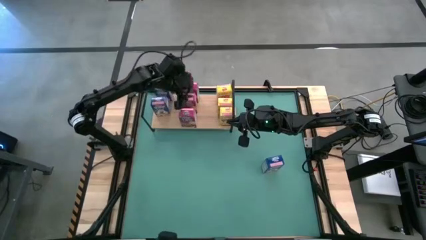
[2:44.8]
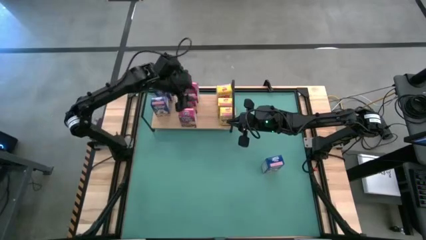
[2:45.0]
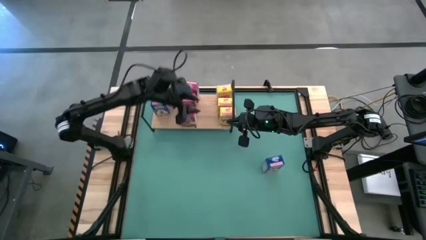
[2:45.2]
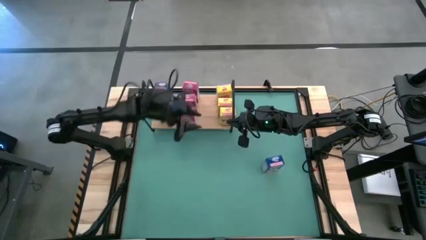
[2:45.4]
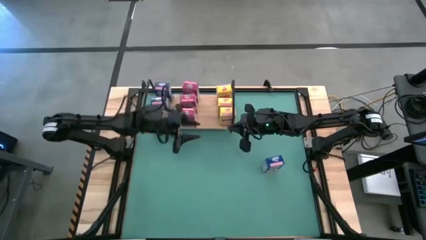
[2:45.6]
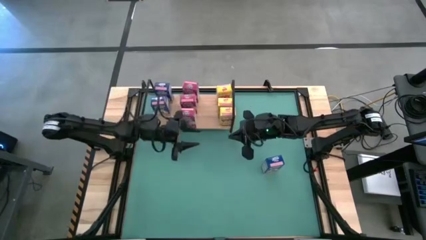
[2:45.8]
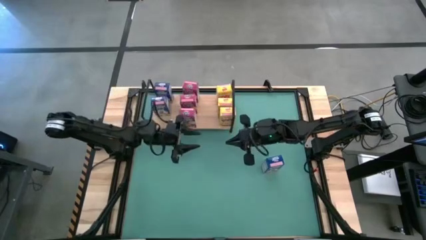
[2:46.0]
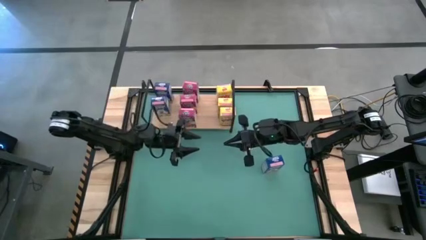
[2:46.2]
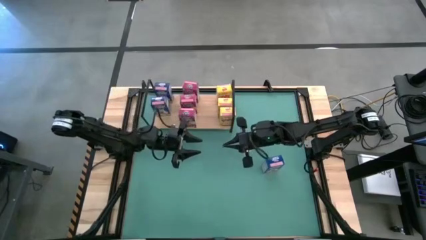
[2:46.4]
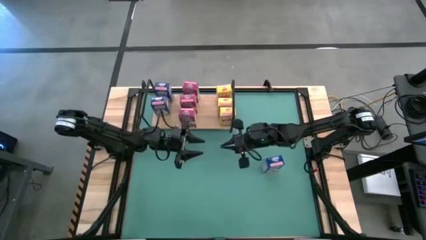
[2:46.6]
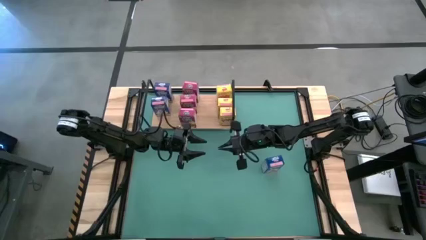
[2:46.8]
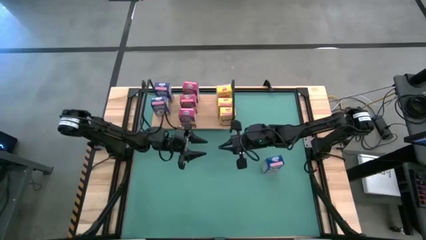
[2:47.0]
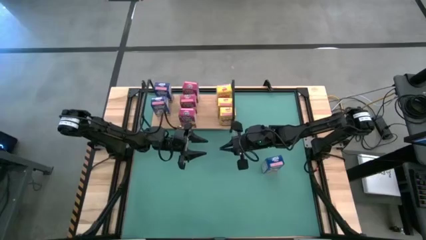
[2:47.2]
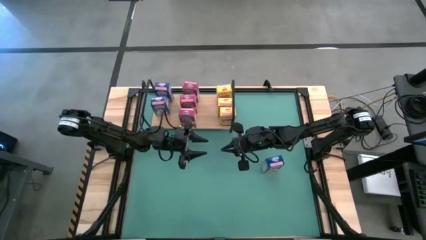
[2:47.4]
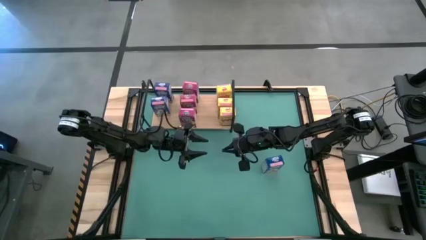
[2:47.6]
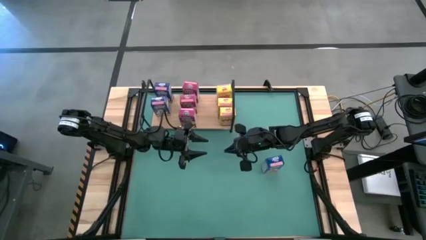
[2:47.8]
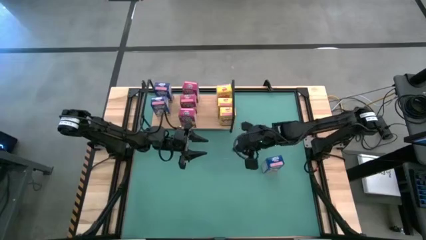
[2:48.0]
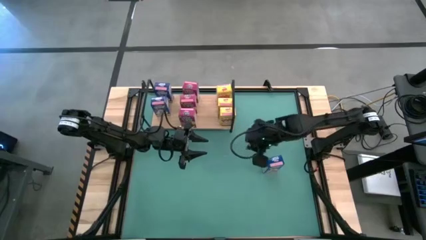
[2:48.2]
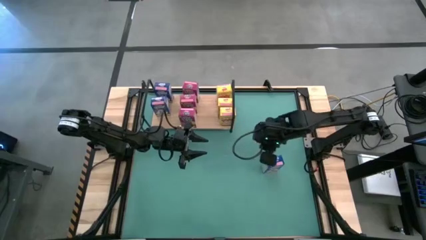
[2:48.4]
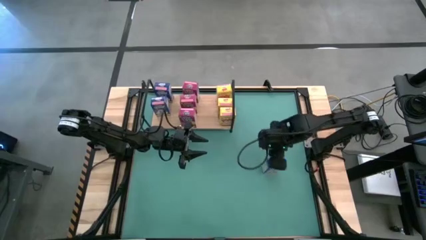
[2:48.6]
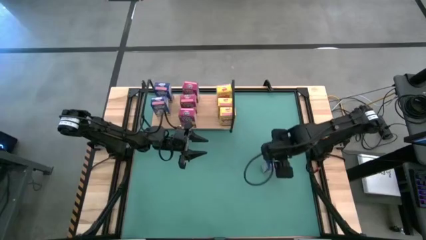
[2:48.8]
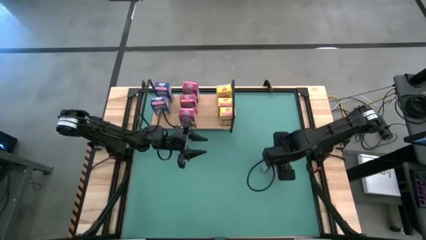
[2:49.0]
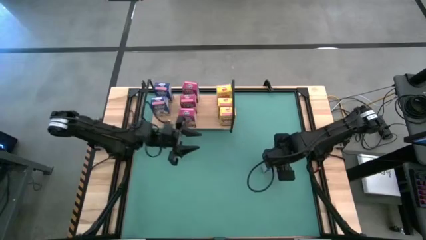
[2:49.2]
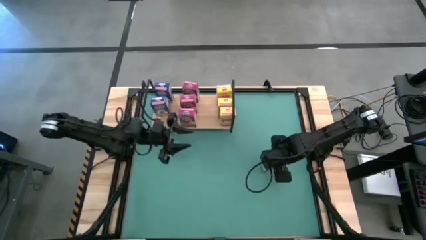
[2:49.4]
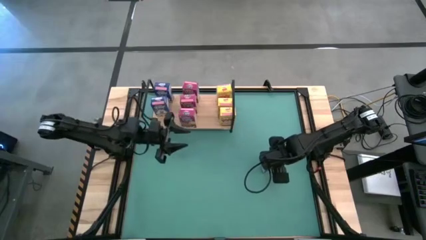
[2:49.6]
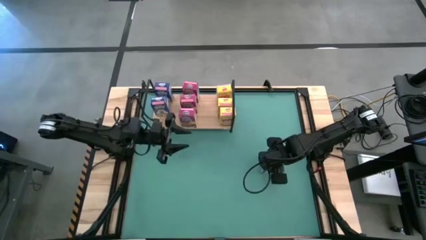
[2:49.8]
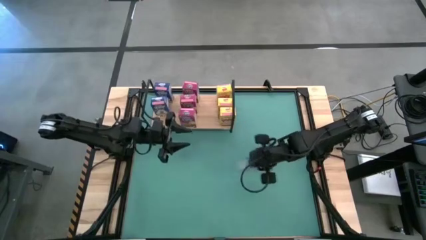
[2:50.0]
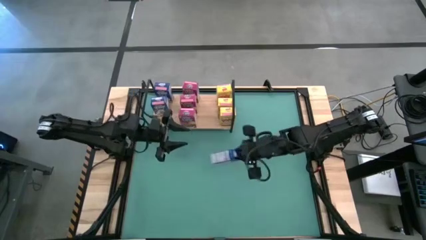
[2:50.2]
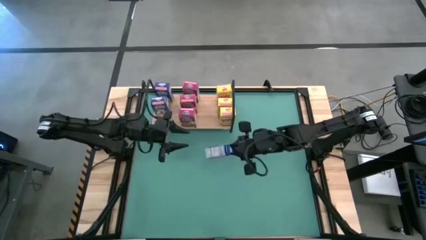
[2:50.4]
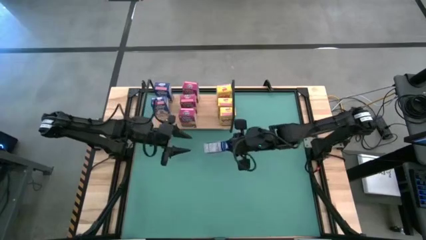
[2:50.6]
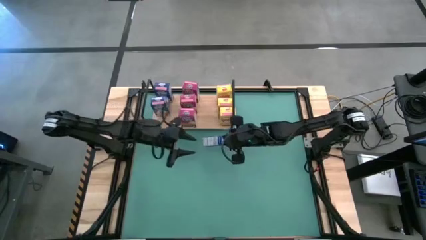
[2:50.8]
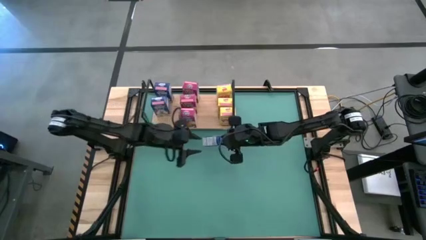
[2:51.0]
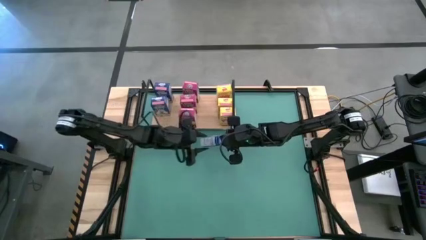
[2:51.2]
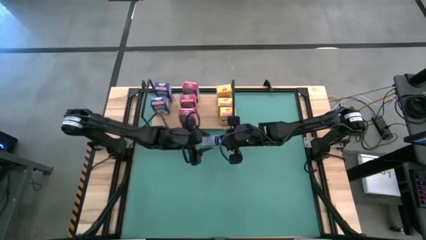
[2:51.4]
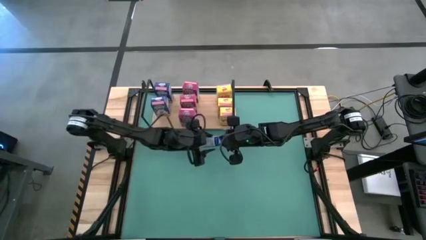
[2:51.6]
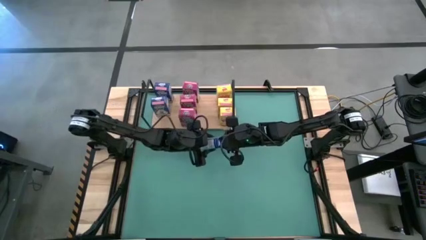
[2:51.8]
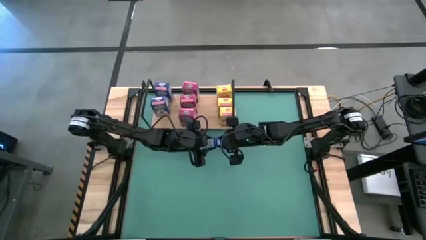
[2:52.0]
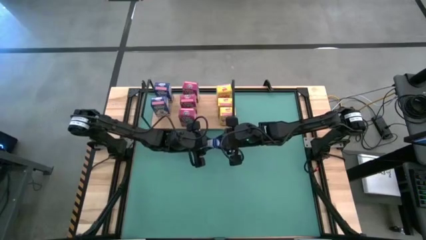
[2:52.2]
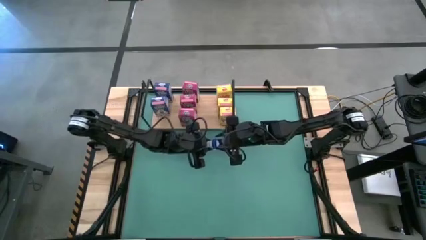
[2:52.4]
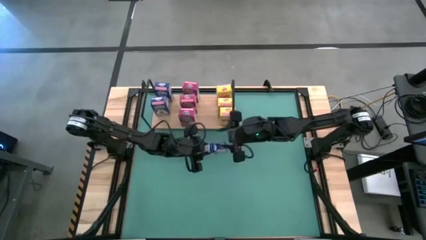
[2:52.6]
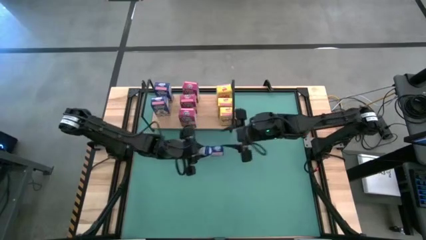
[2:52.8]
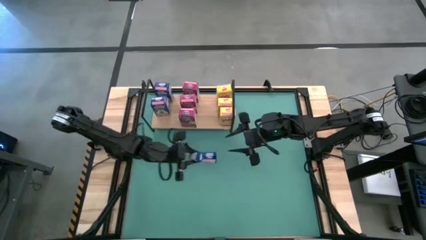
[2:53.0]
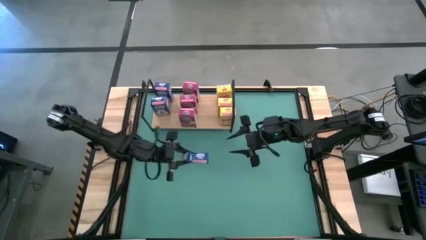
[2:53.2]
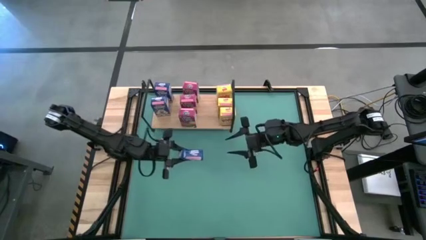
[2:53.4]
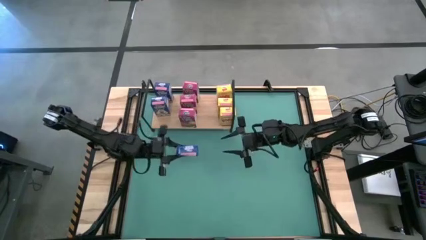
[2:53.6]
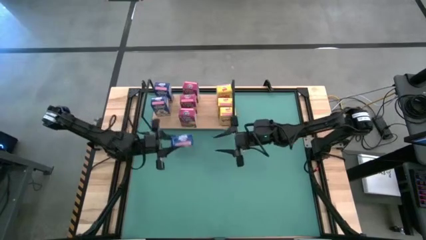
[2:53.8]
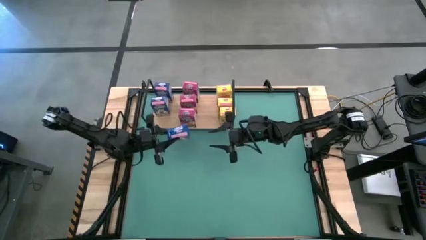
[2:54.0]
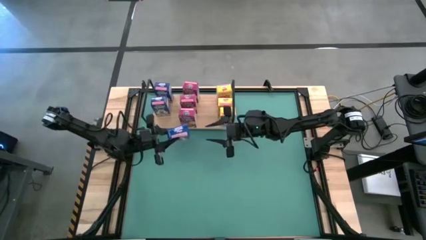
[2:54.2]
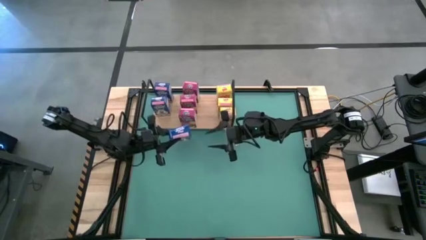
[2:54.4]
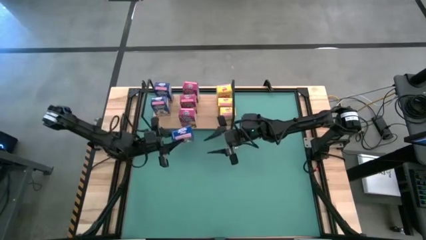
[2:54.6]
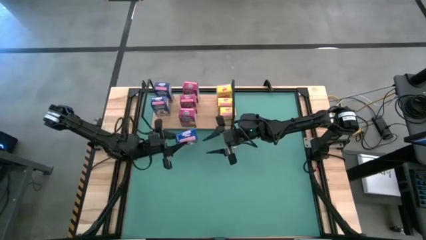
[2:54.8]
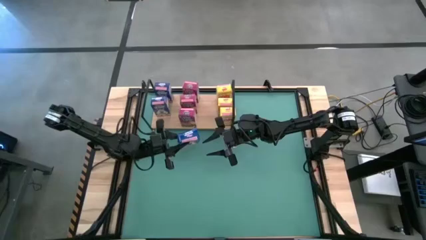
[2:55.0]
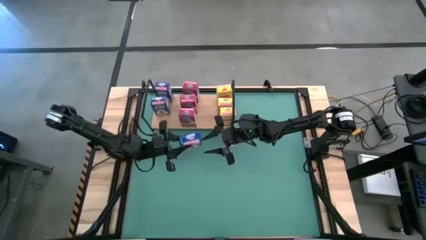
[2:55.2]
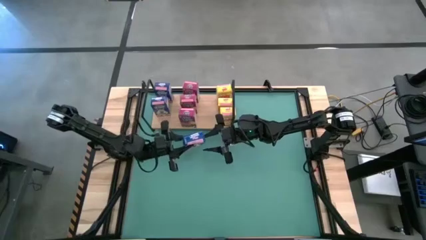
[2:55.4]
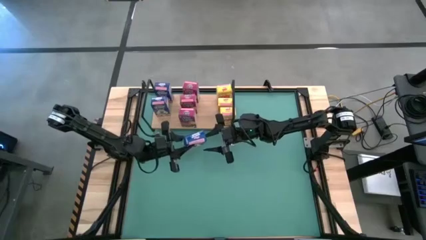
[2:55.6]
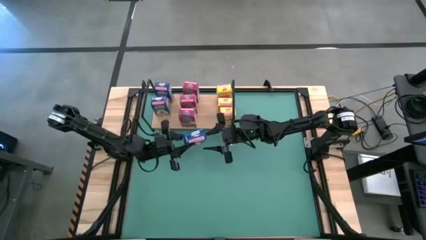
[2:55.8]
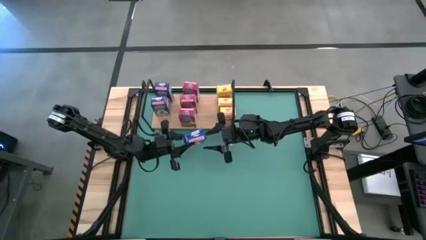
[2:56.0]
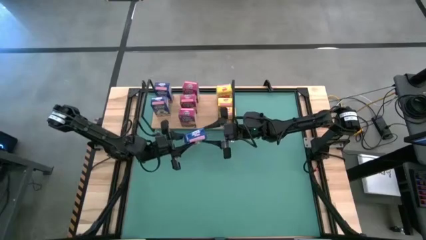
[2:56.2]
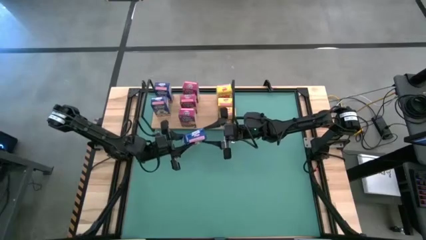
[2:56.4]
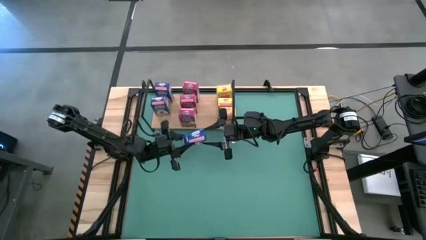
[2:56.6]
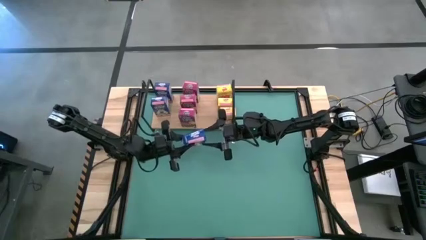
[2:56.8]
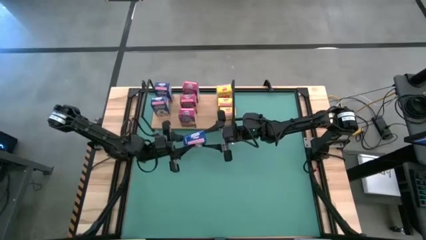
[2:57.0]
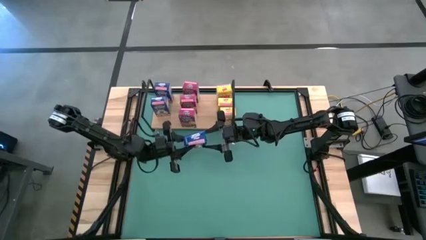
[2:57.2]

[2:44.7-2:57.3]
Task: Stack cereal on shelf
Put the blue cereal box on the shelf

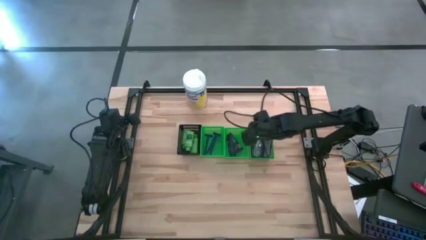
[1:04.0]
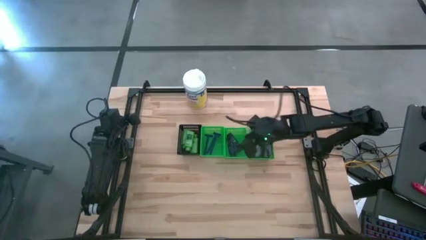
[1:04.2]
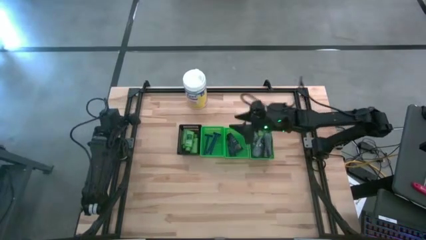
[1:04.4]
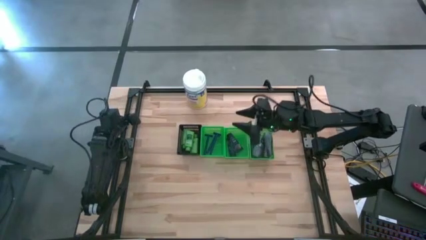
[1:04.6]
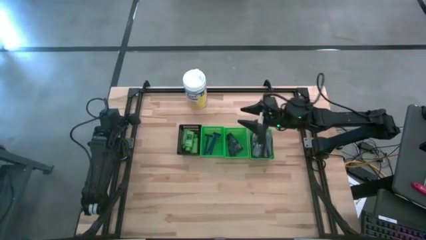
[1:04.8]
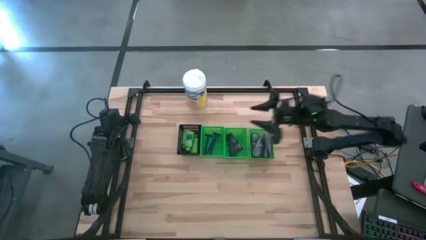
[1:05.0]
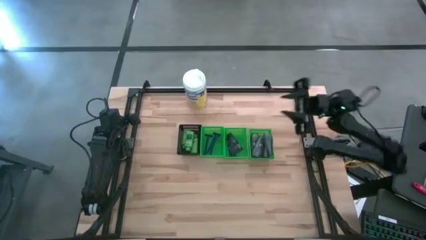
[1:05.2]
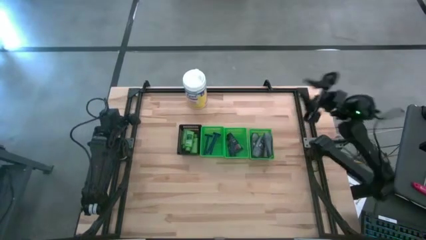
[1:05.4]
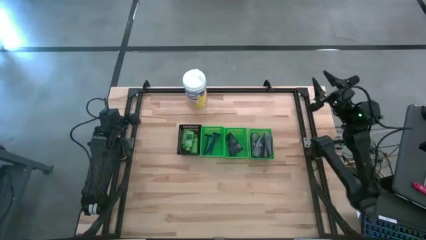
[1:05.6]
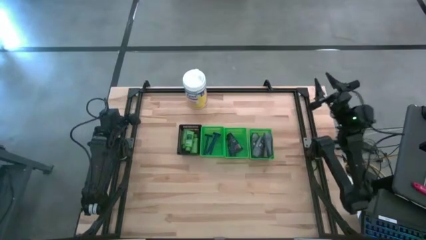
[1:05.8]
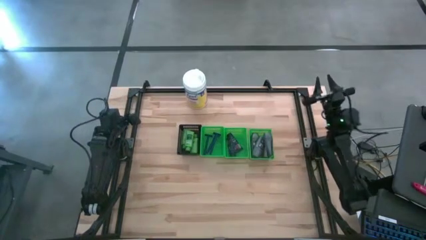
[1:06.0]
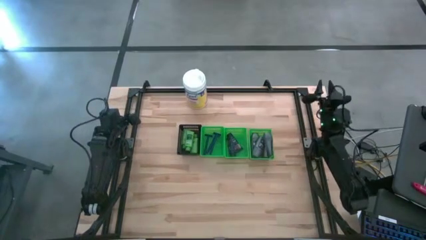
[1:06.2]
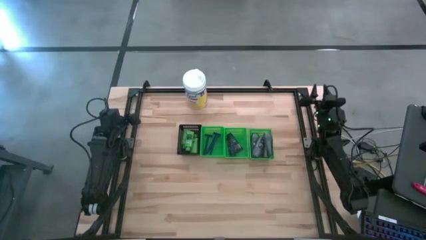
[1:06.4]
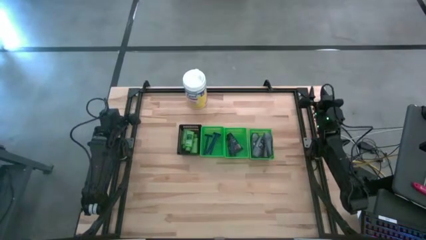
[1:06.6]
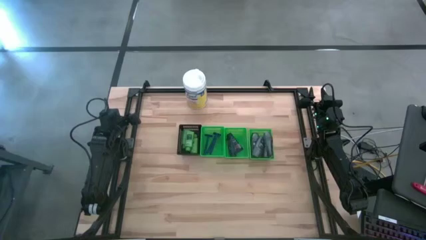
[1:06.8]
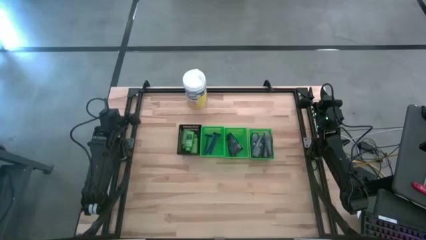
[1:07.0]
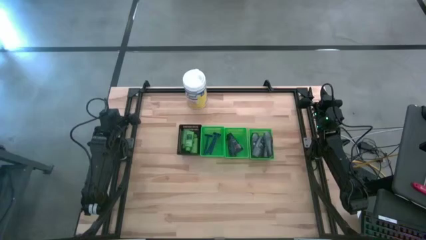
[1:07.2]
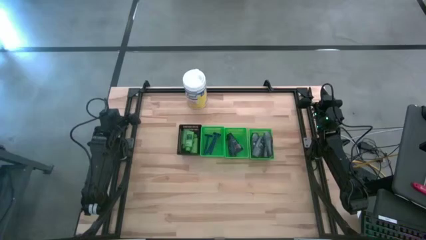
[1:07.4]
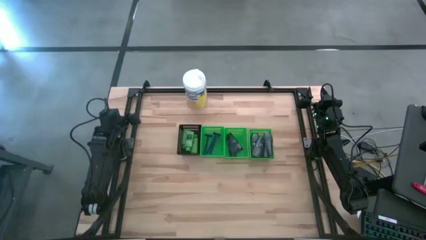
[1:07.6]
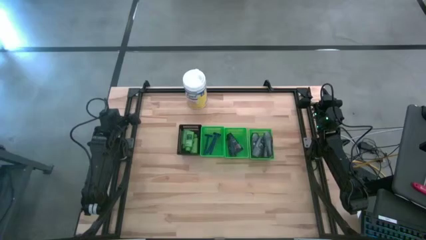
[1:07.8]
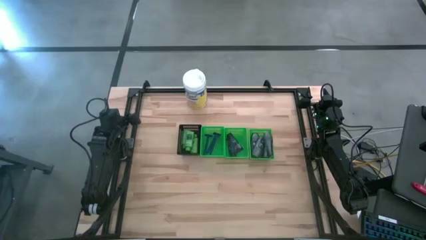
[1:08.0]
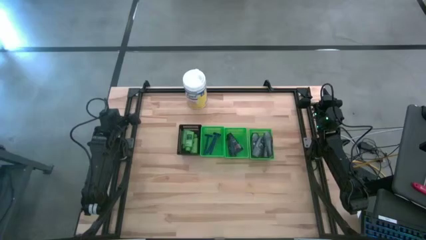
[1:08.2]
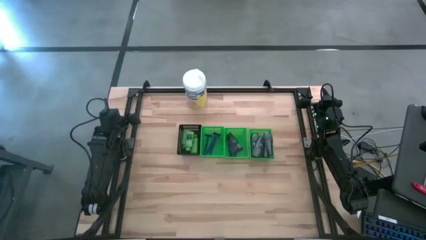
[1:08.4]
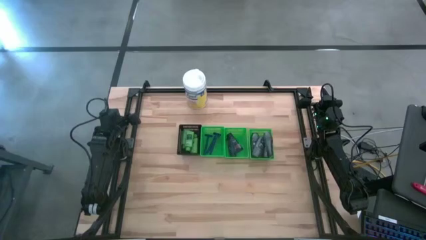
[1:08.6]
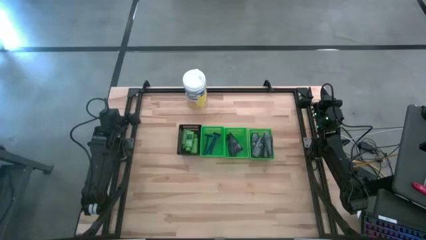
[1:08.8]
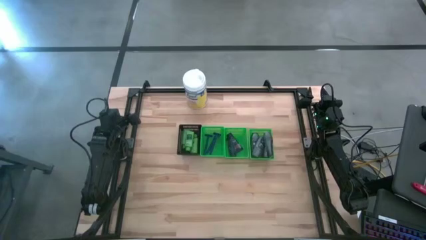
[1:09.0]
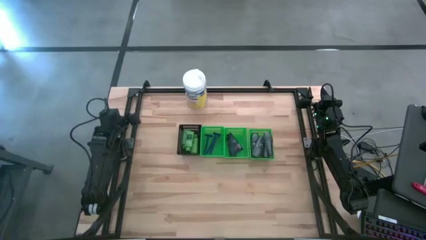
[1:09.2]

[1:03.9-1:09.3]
Task: Pick & Place Travel size toiletries
Return to Home Position
